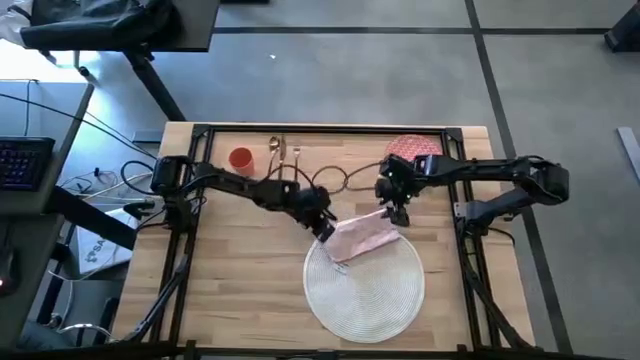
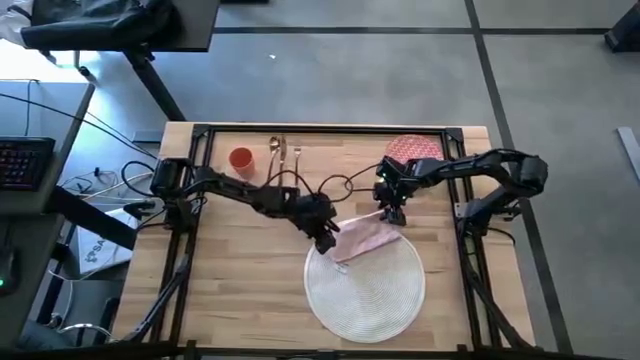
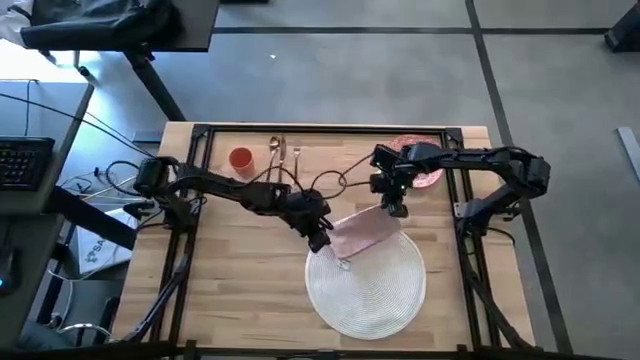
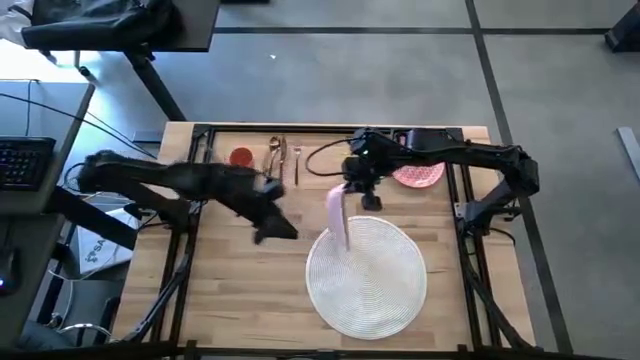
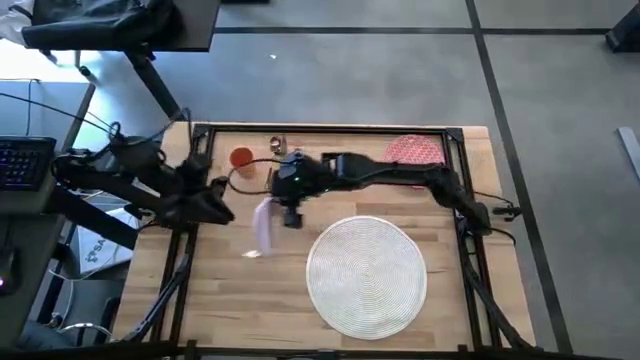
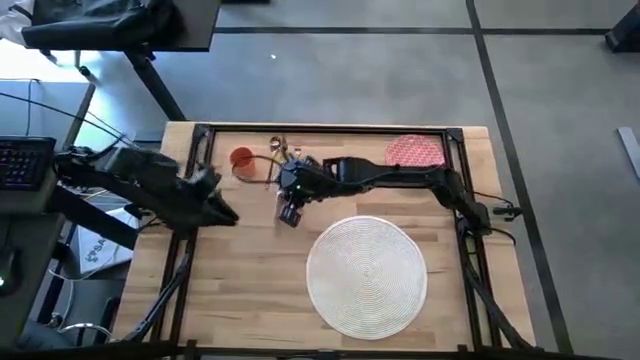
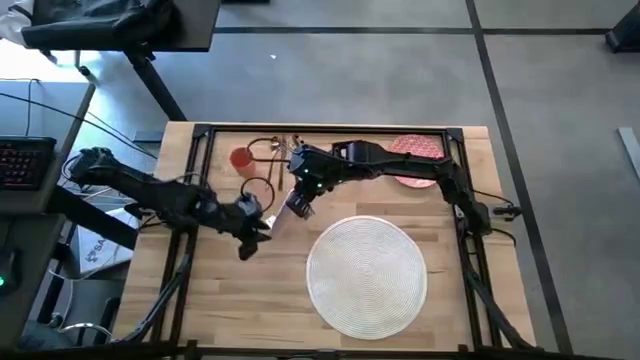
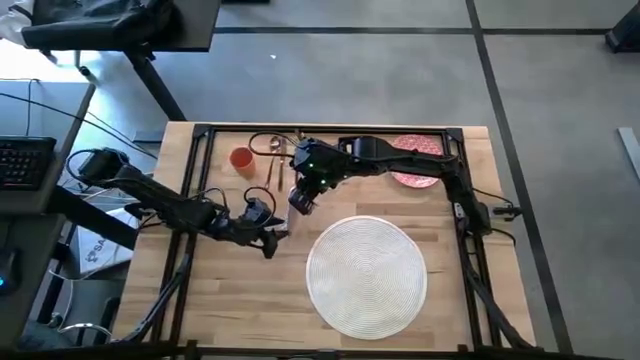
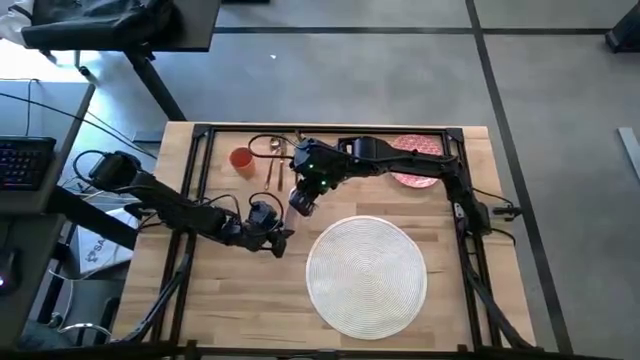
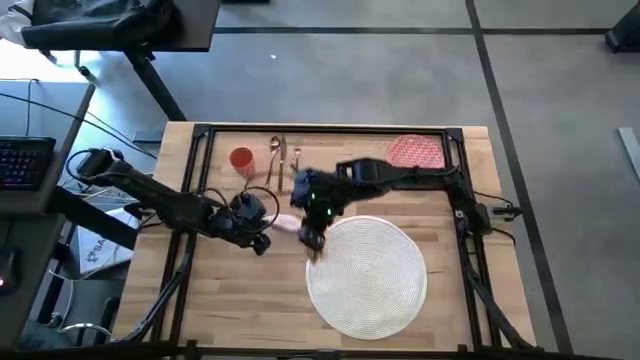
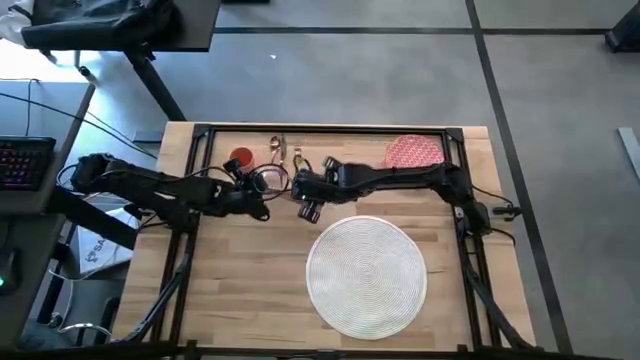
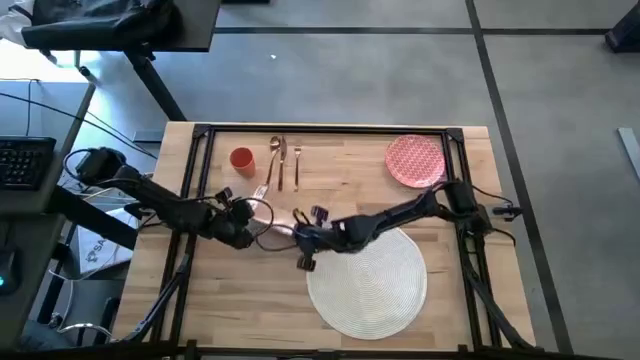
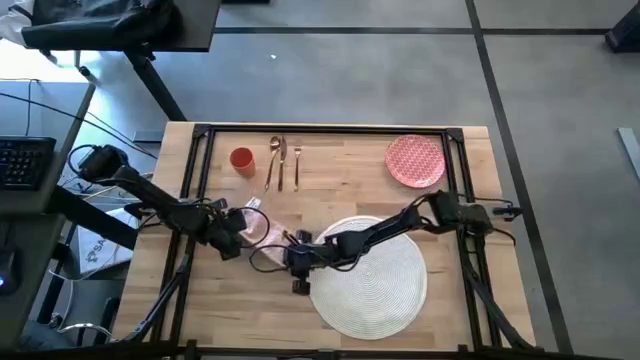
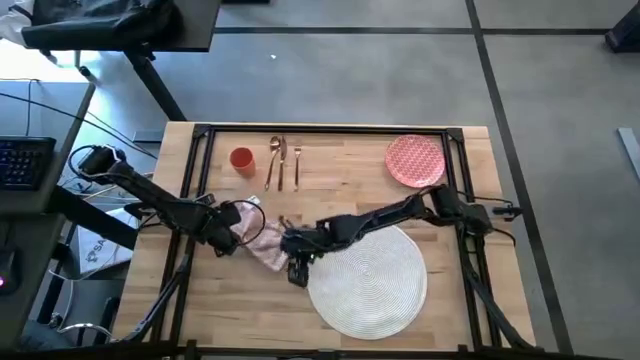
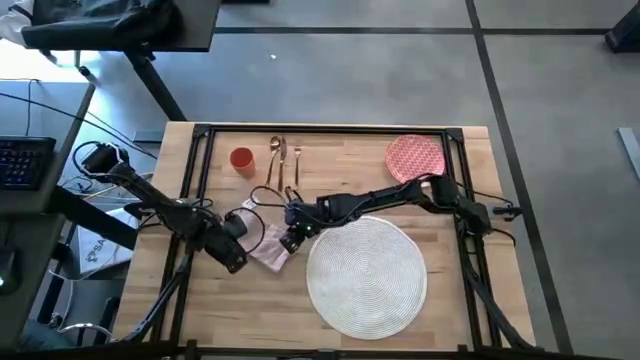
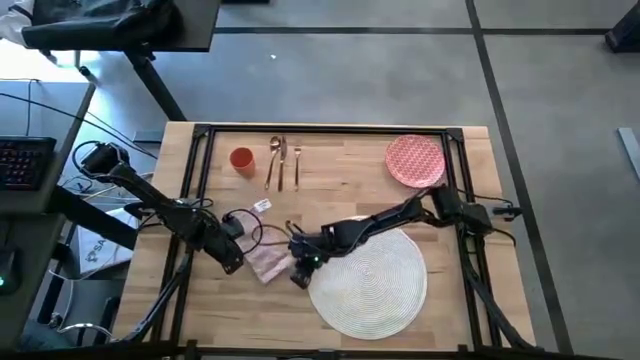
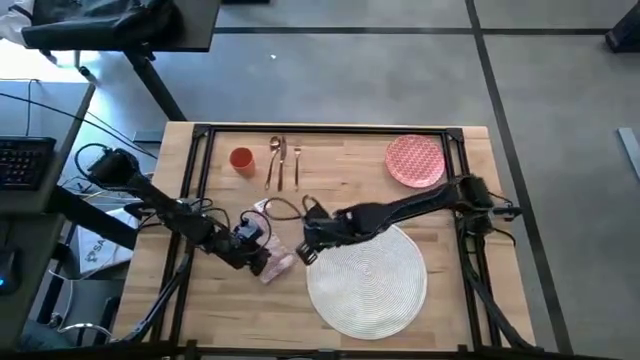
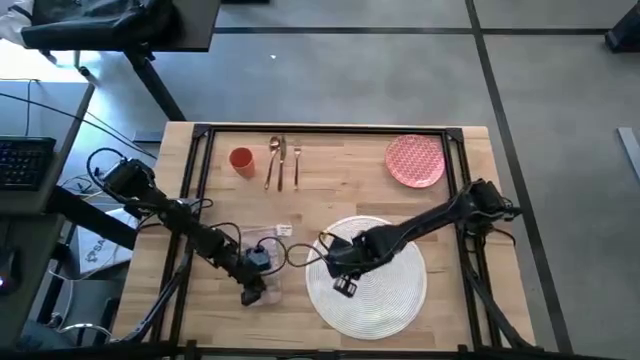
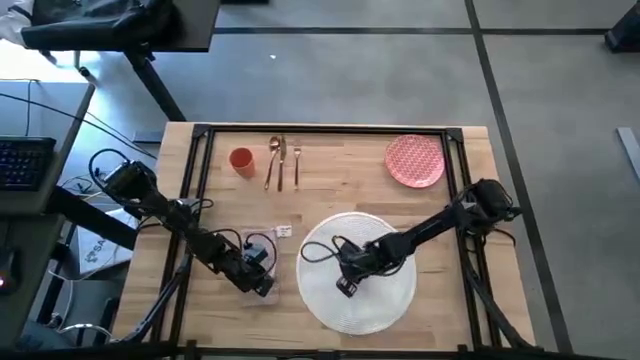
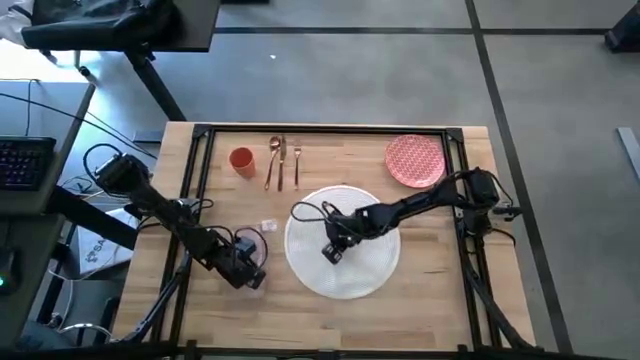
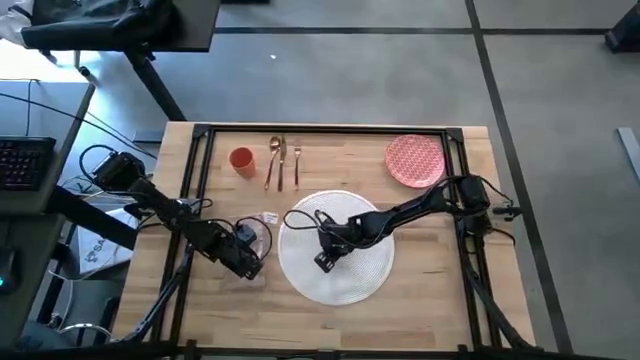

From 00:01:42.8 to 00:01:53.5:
Task: Set table place
Adjust the table napkin and the table mat

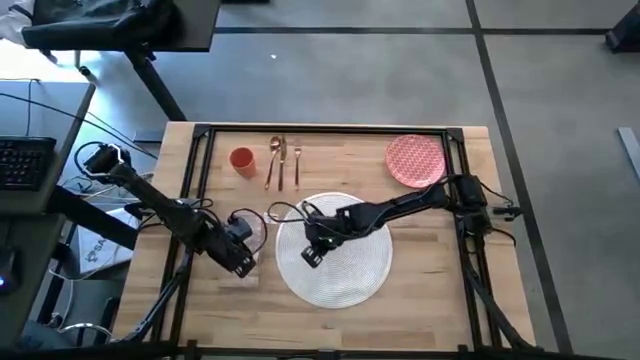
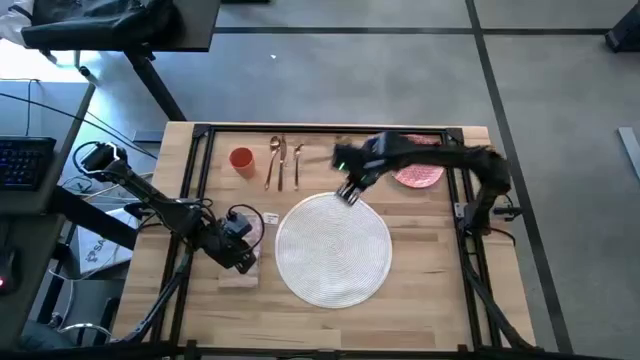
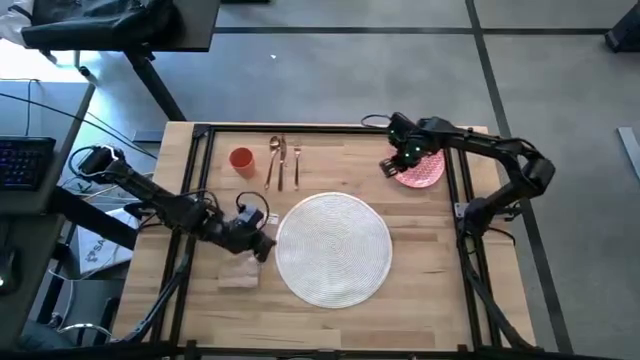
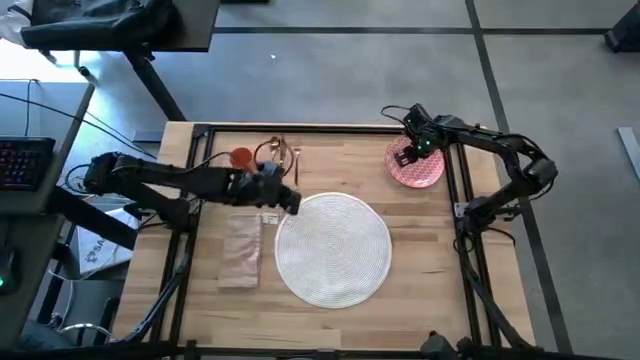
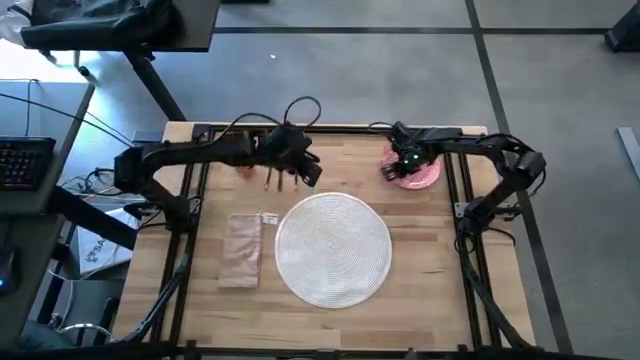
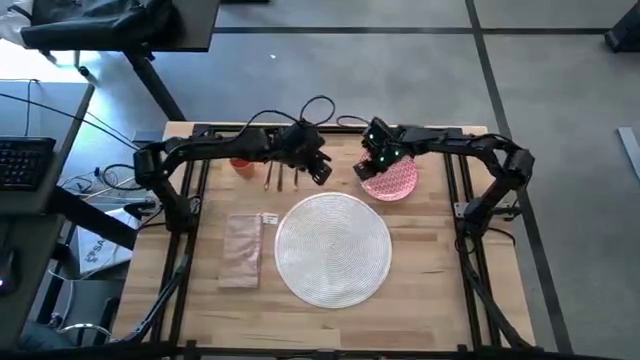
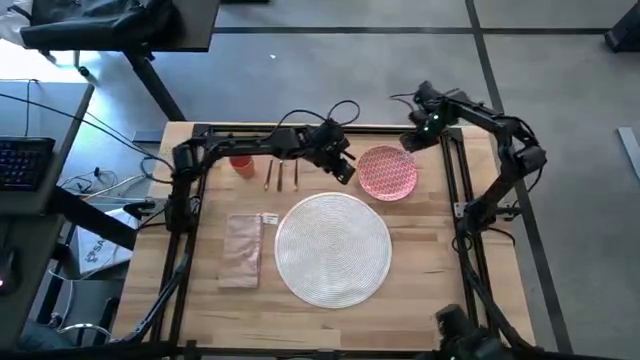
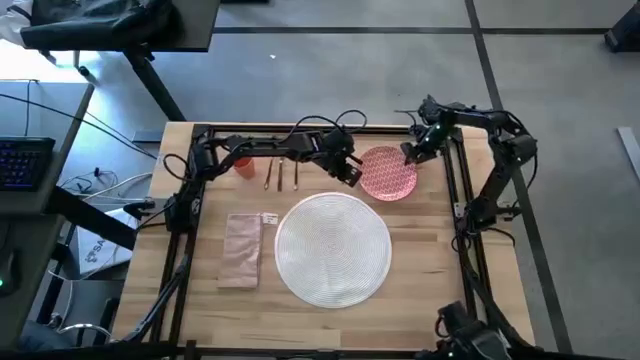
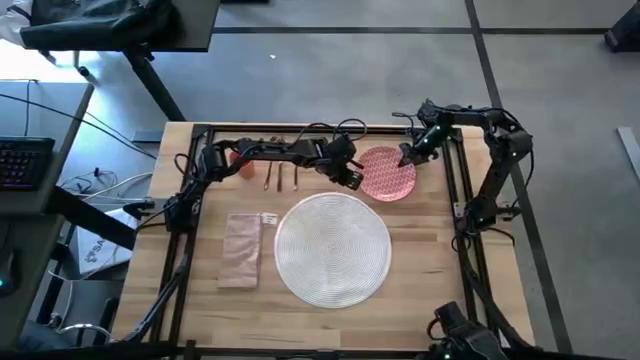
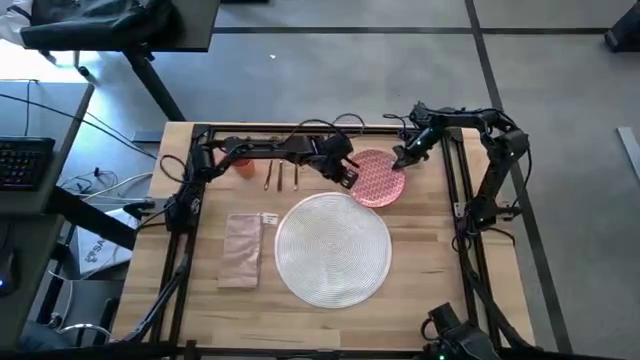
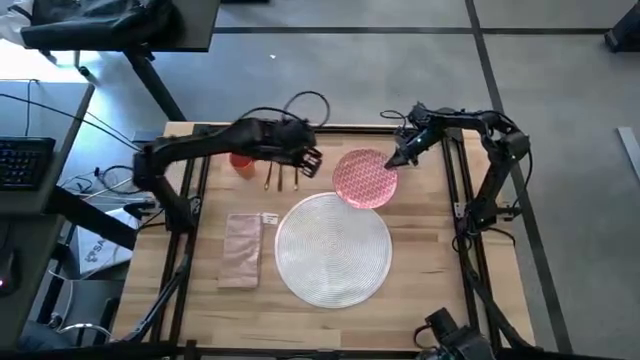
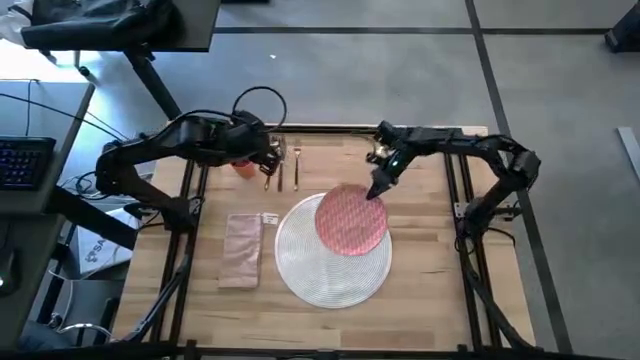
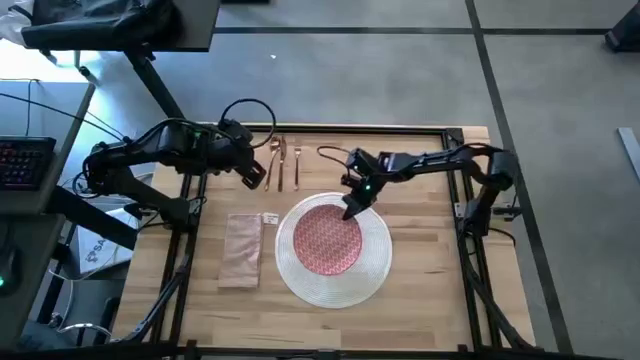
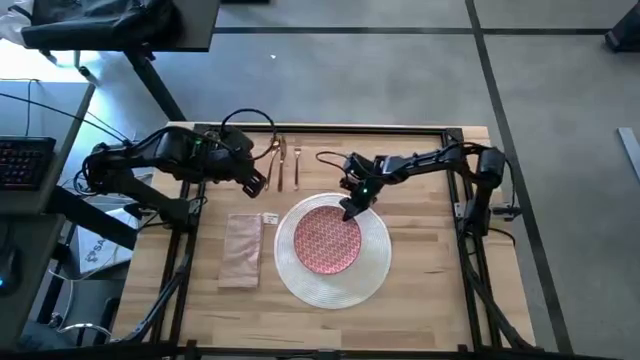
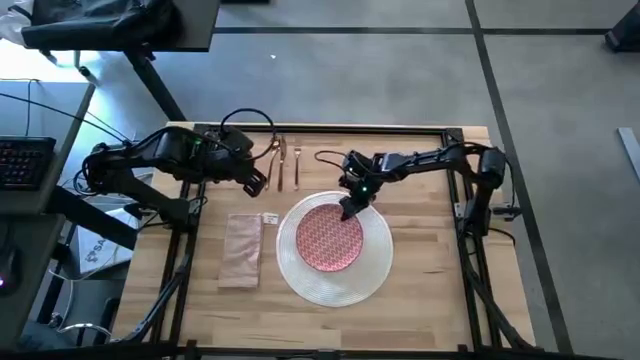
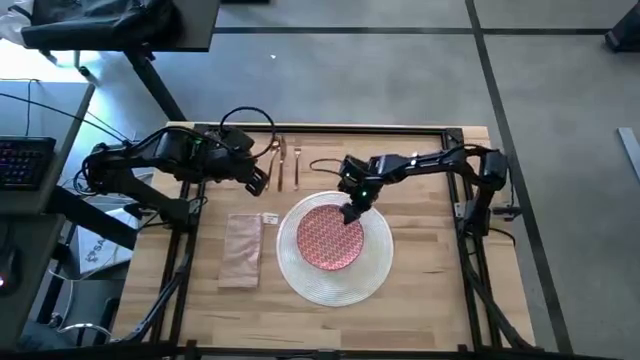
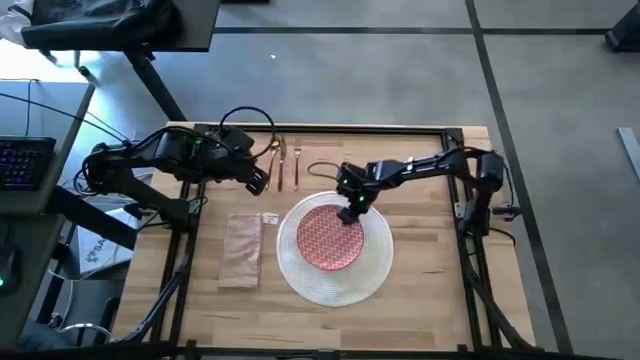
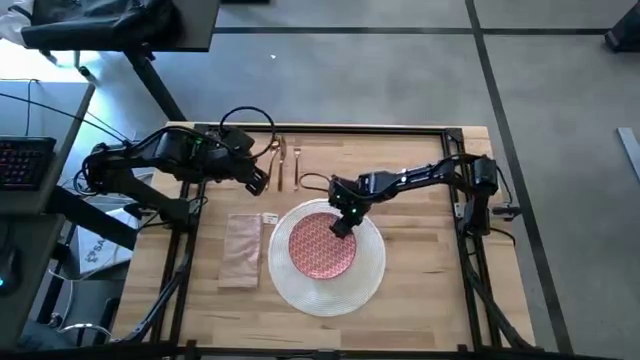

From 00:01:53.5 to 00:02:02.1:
Put the red patterned red plate on top of the white table mat

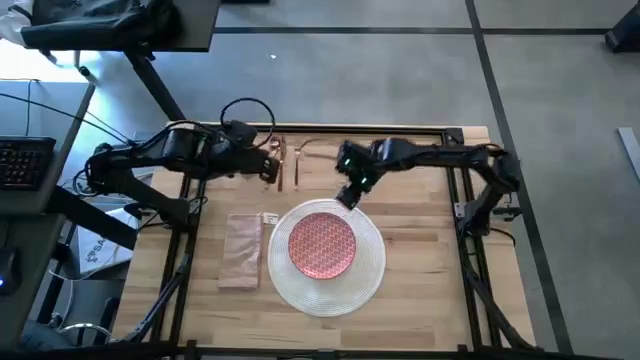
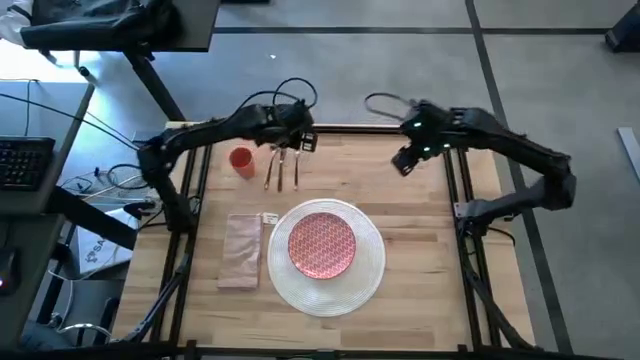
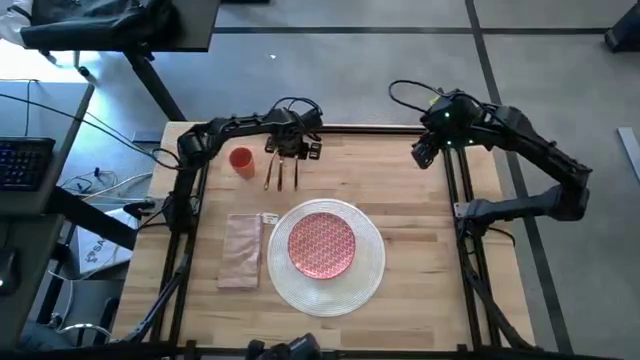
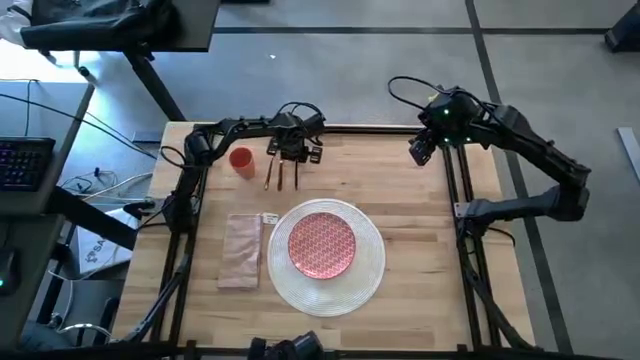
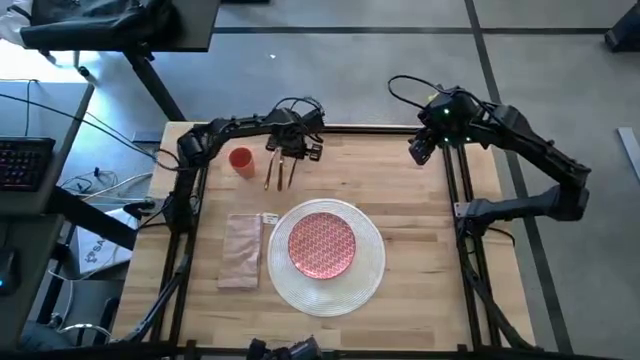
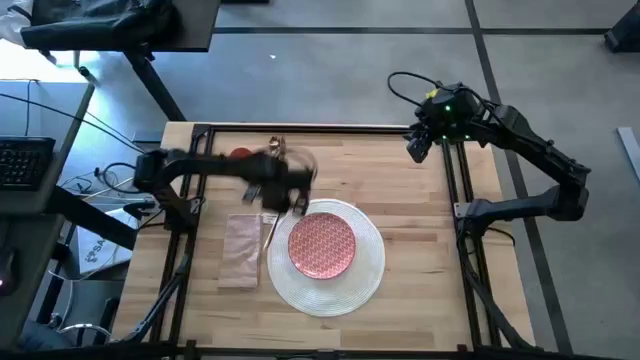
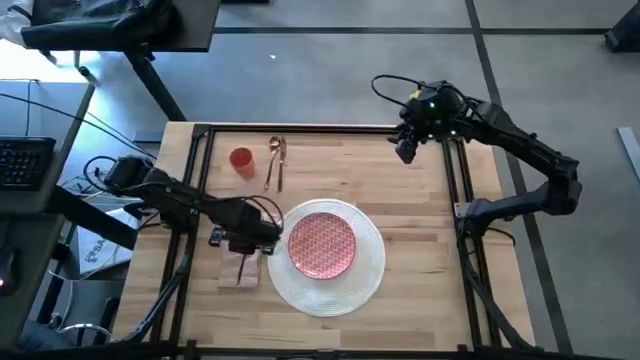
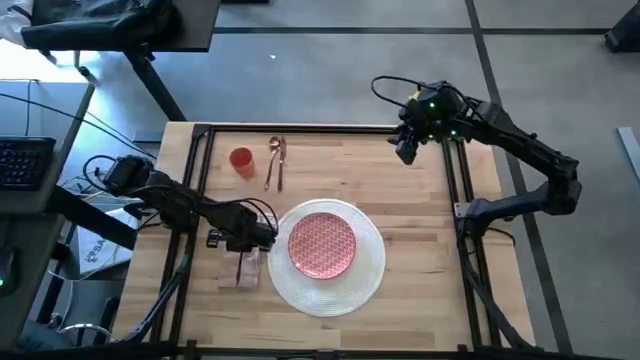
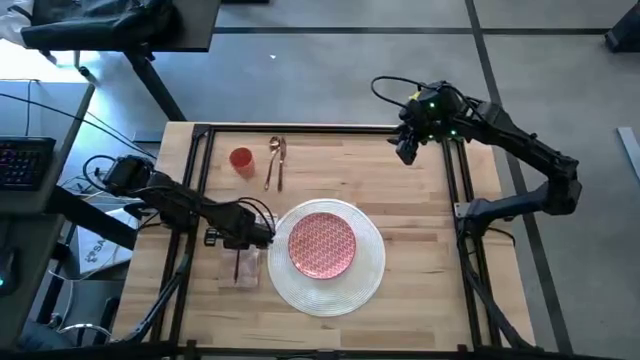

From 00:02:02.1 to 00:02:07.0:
Put the fork on top of the pink table napkin
